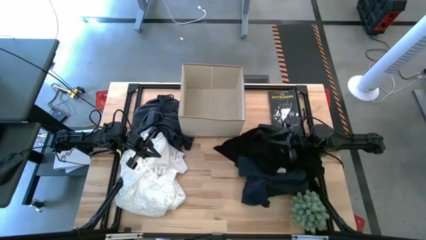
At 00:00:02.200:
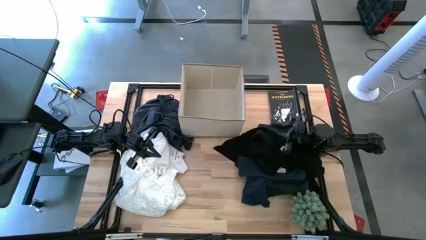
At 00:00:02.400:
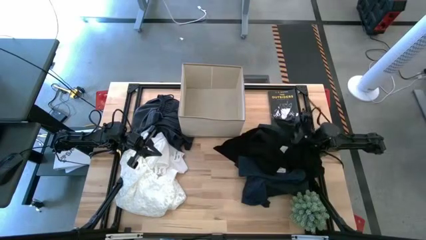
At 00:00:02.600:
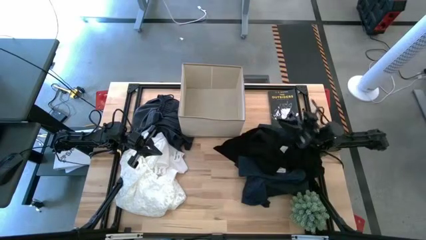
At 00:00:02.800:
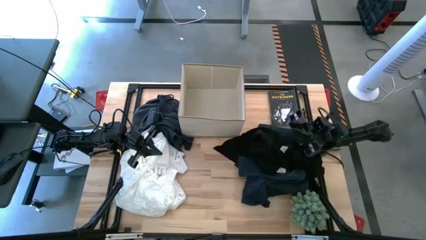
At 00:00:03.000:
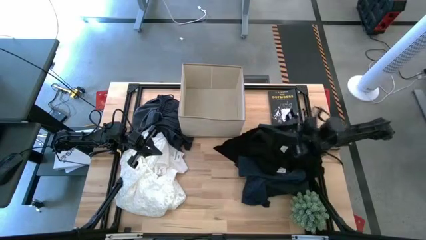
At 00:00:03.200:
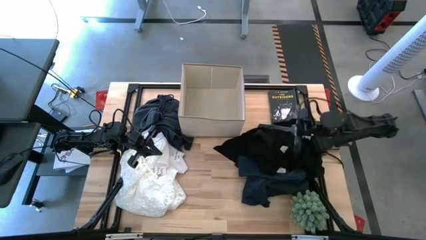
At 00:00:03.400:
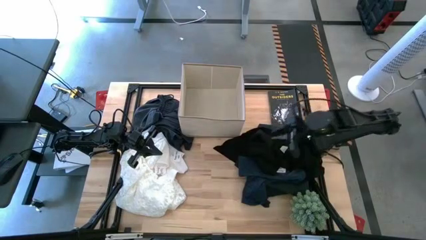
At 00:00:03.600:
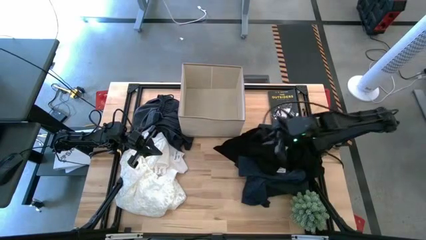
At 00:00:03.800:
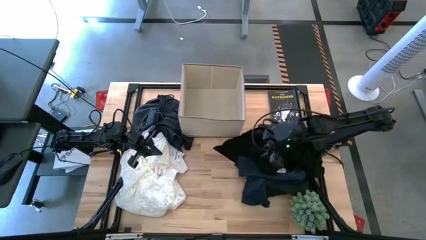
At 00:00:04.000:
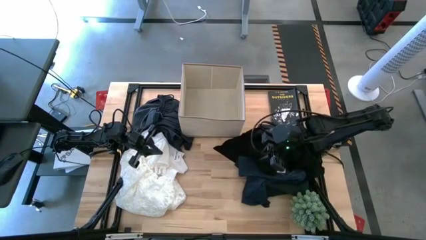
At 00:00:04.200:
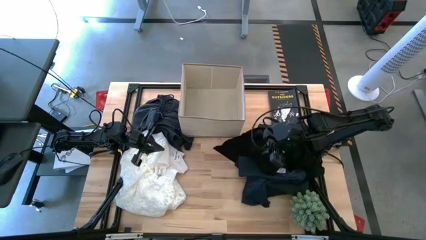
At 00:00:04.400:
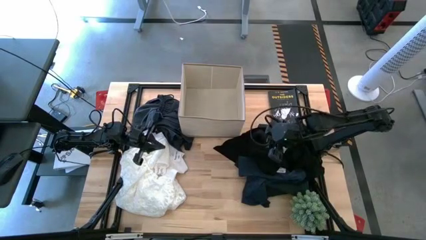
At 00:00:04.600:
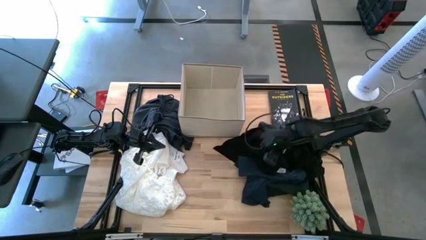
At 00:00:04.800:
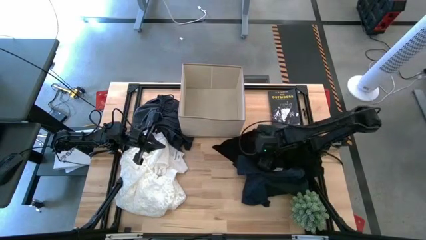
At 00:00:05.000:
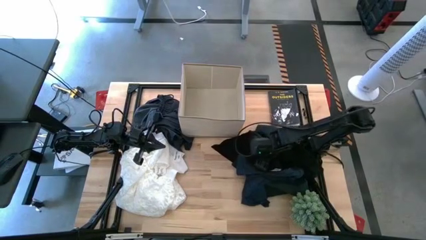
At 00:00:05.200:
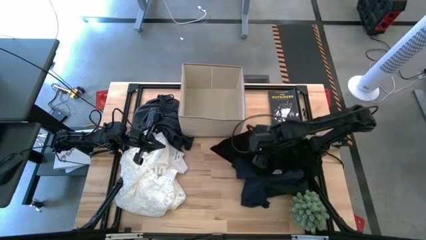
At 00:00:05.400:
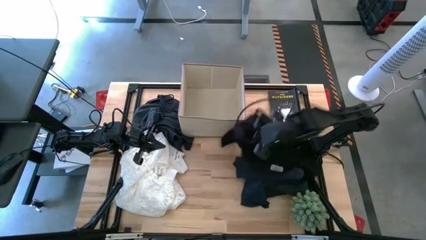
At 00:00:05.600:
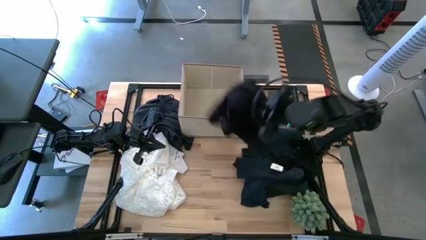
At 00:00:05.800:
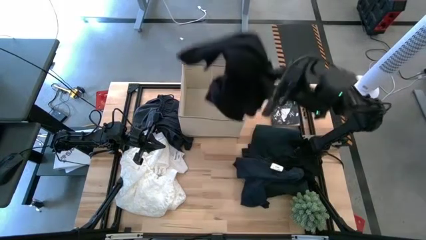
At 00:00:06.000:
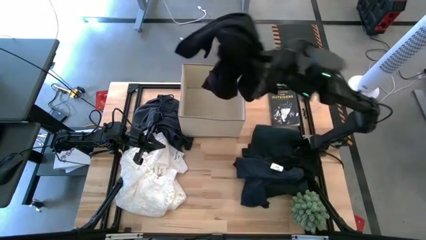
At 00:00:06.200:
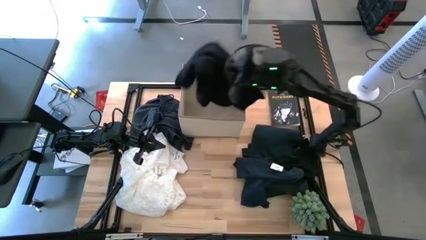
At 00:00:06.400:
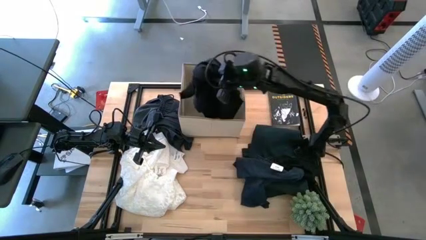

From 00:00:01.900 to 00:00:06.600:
Task: Sort clothes
Put the black shirt into the laundry organizer

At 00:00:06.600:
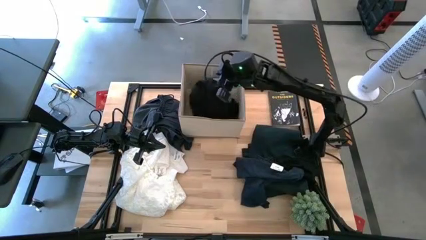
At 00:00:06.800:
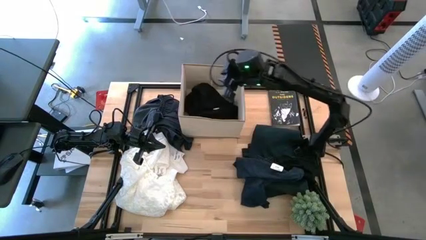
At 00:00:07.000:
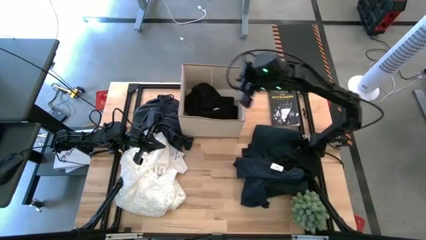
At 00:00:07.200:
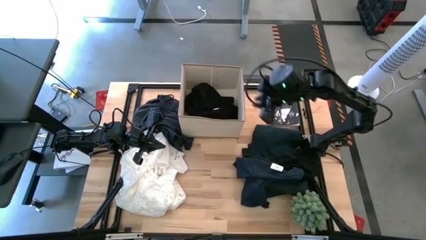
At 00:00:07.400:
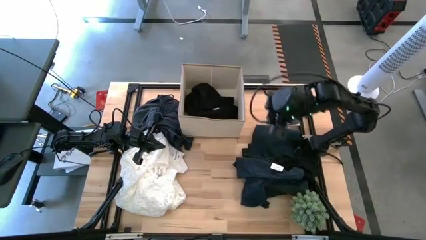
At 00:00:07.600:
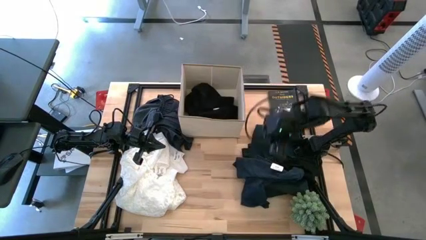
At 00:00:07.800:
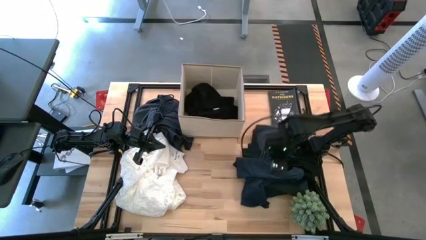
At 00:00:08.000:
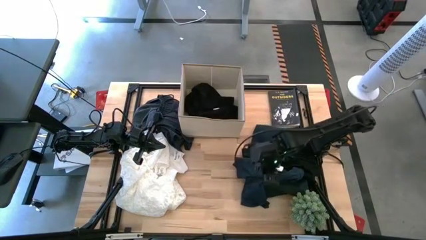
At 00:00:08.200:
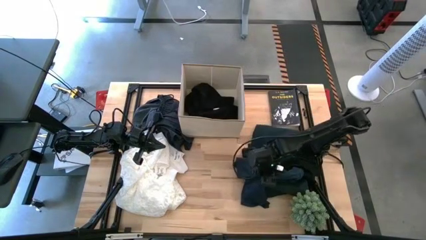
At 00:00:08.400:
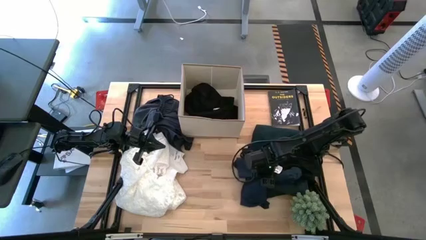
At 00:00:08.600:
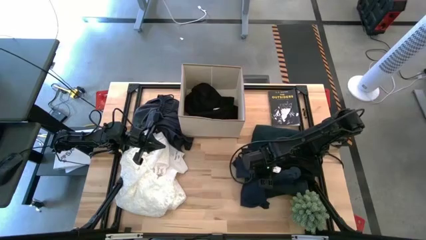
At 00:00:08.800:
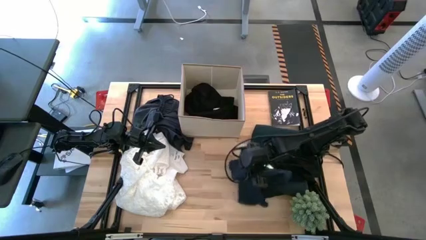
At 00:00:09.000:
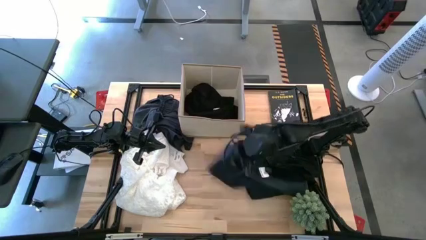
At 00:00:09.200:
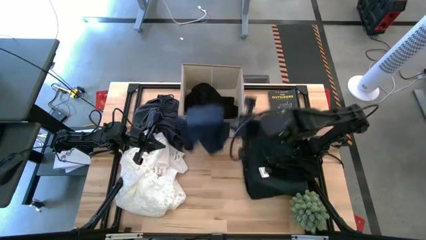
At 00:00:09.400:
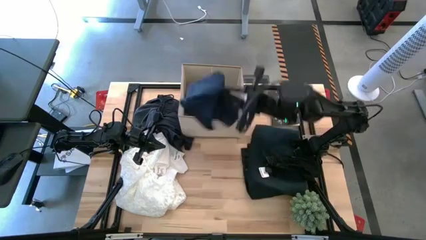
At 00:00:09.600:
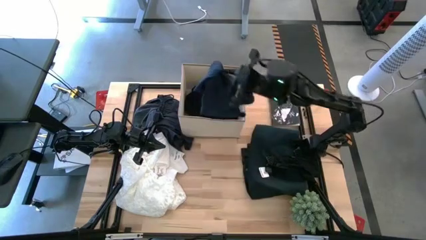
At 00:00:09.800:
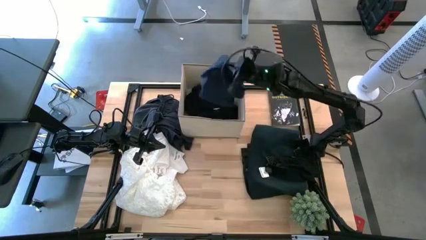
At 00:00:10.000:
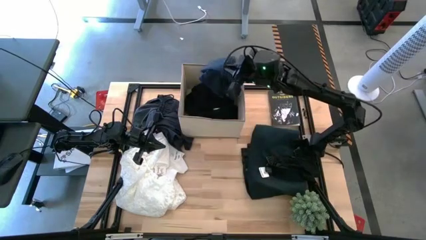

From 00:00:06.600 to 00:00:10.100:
Put the dark blue shorts into the laundry organizer

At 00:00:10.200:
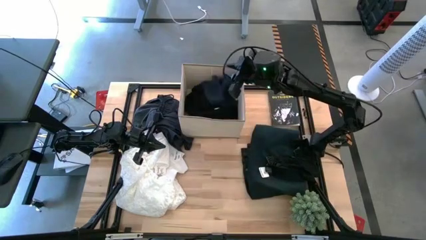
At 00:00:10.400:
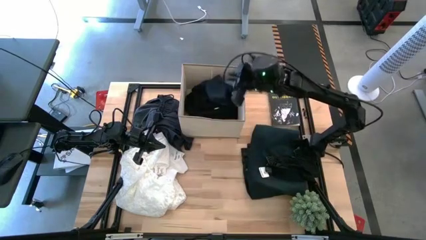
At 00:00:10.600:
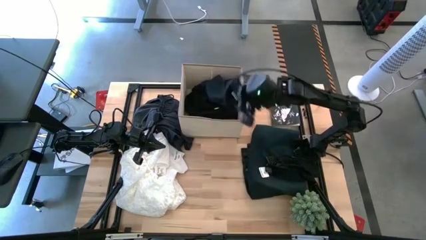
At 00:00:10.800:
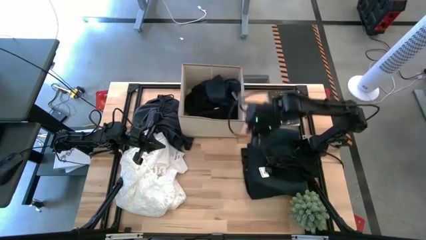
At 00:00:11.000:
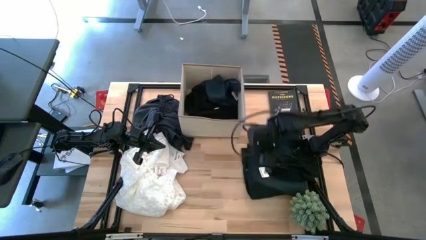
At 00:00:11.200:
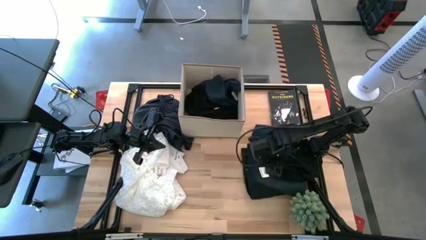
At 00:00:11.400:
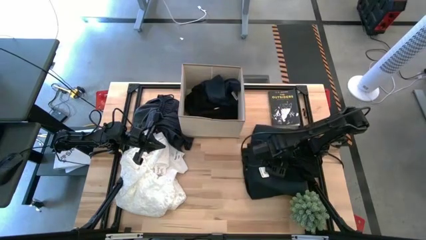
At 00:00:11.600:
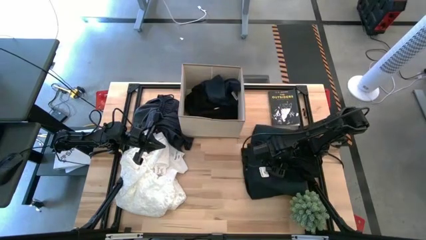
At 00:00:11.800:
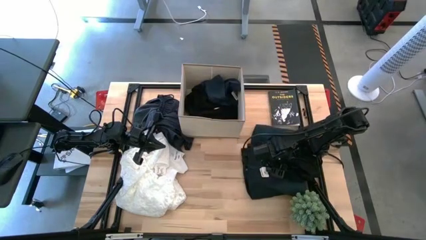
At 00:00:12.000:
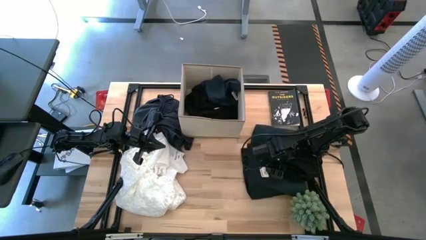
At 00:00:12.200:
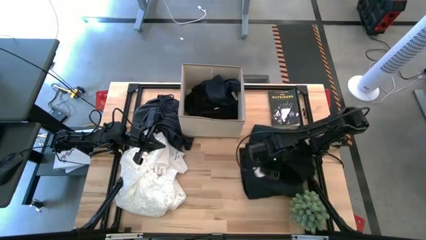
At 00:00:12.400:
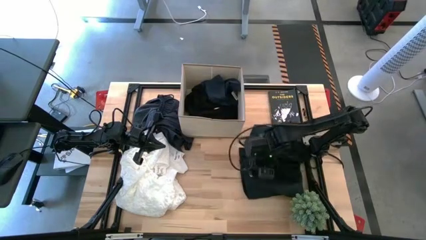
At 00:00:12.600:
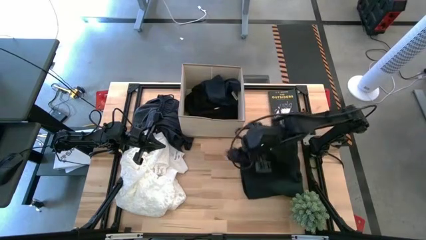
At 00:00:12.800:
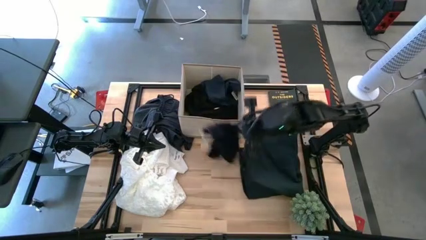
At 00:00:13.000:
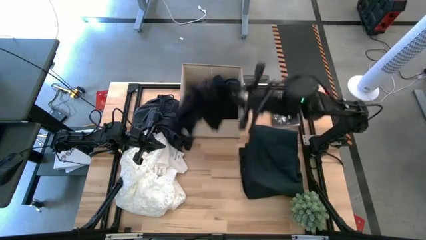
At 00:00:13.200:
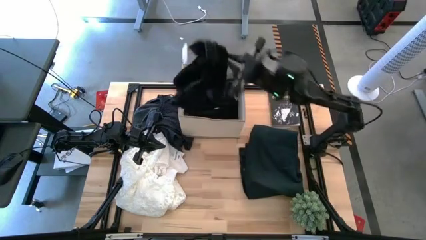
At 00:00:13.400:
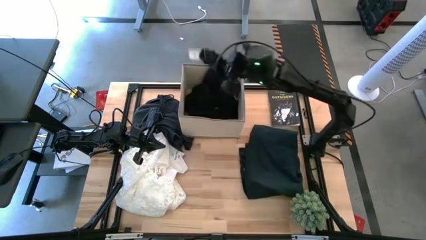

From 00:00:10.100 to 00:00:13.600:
Put the black underwear into the laundry organizer

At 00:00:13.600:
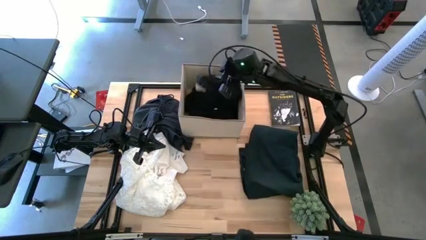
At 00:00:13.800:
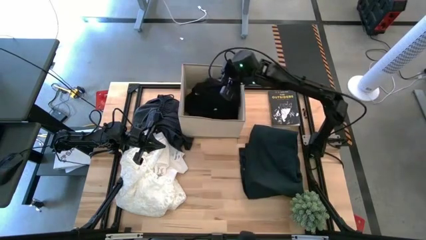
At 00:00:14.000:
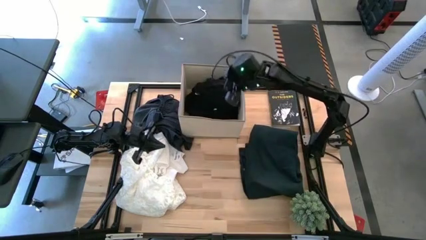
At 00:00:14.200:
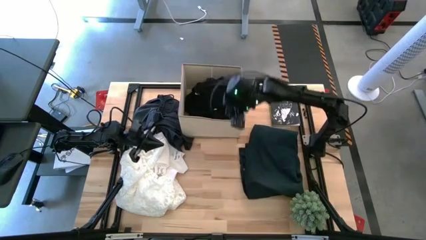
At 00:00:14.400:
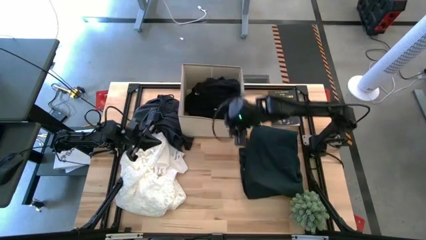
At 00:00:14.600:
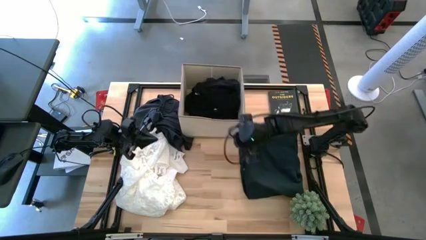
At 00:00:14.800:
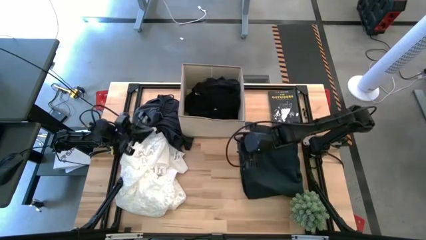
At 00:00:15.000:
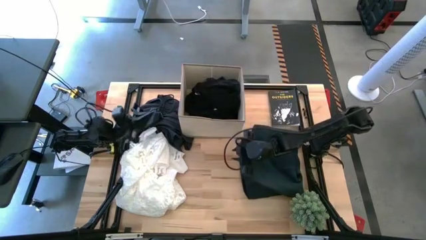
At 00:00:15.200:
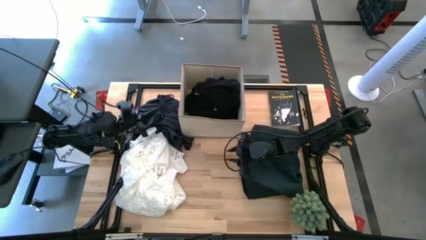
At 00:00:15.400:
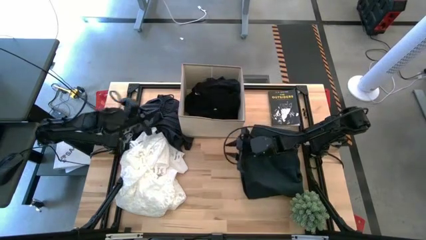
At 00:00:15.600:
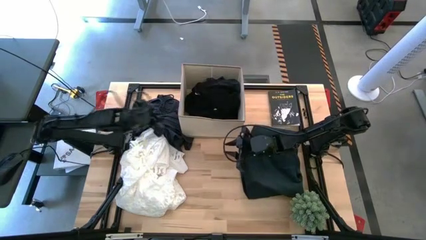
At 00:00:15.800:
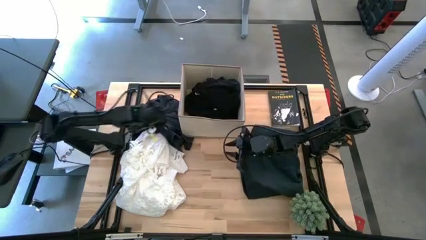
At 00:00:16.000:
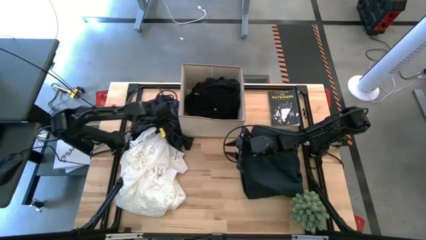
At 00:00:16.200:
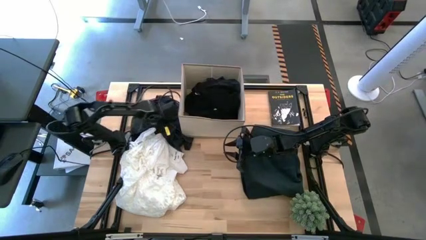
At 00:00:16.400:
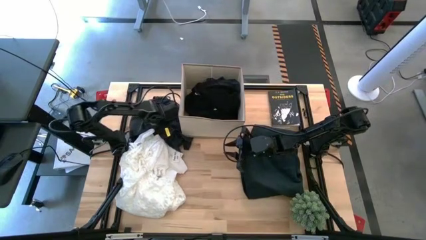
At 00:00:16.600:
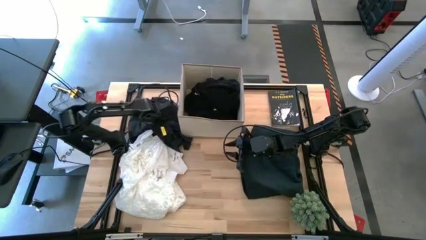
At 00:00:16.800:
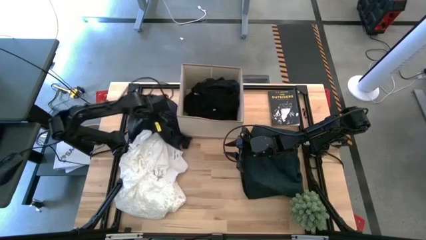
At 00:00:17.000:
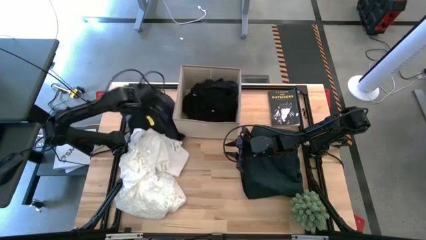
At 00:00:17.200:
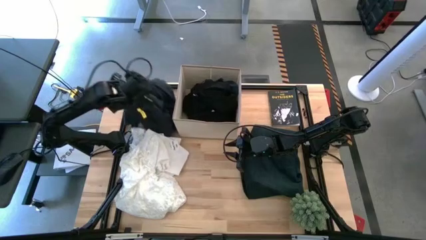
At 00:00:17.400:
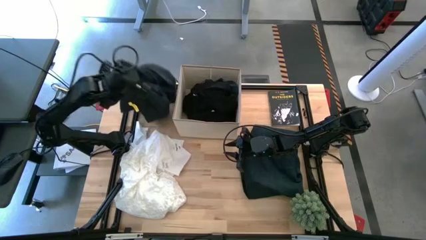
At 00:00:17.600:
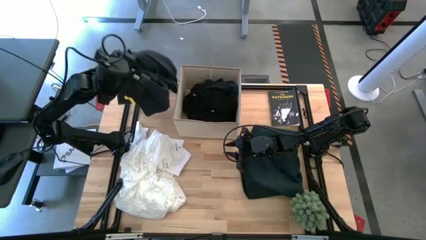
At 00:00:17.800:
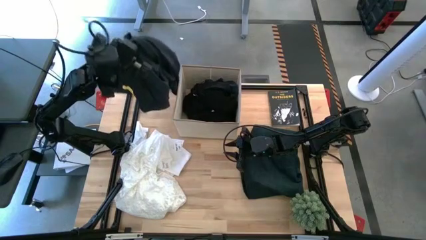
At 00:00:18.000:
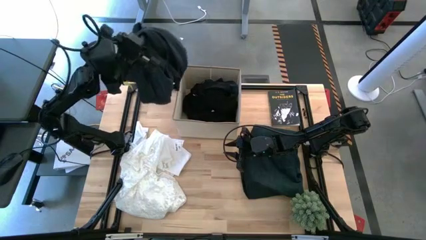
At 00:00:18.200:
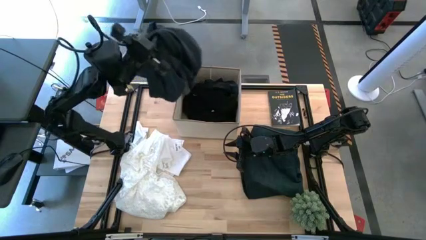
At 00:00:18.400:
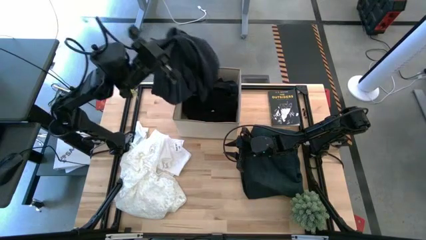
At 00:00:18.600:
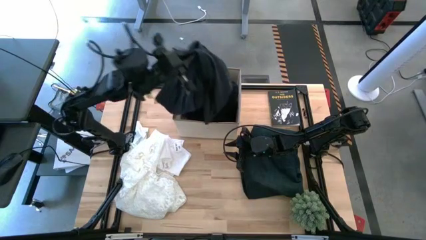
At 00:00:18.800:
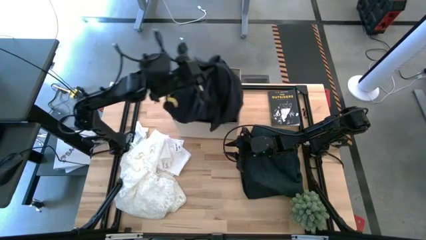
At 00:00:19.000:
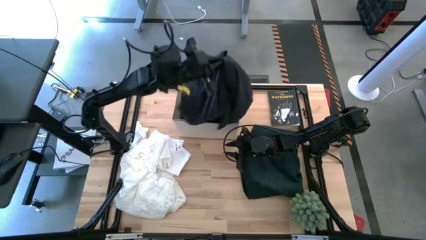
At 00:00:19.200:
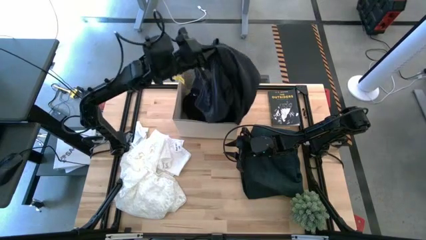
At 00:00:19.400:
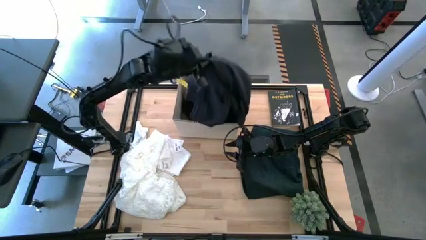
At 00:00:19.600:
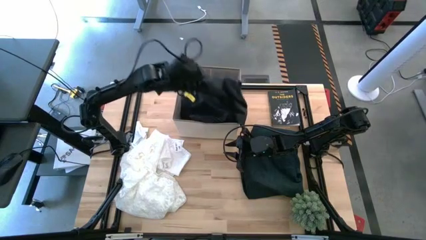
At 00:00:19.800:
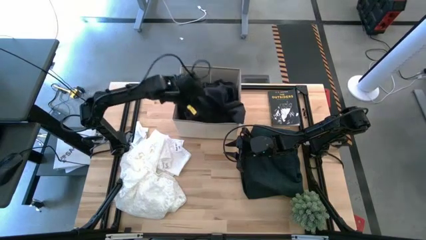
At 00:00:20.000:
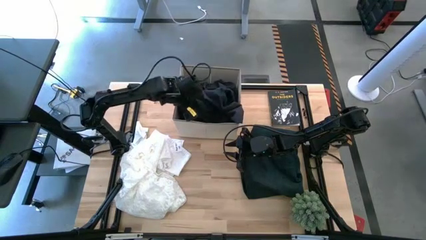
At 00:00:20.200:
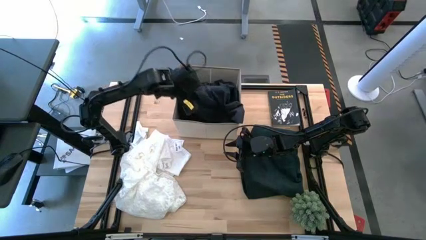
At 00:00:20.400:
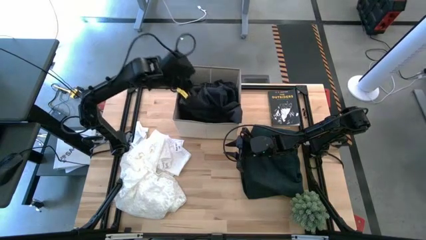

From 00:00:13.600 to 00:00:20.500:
Put the black pants into the laundry organizer
